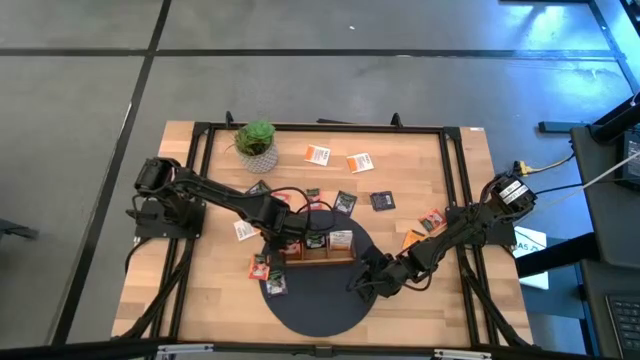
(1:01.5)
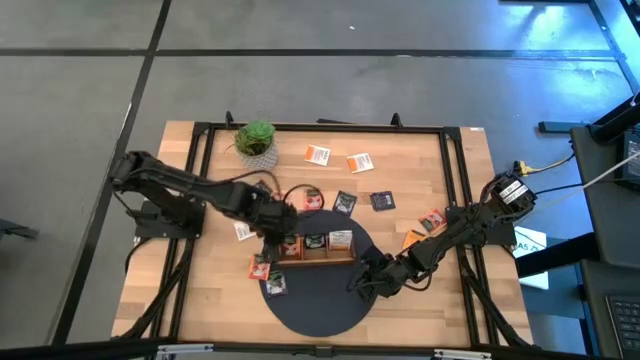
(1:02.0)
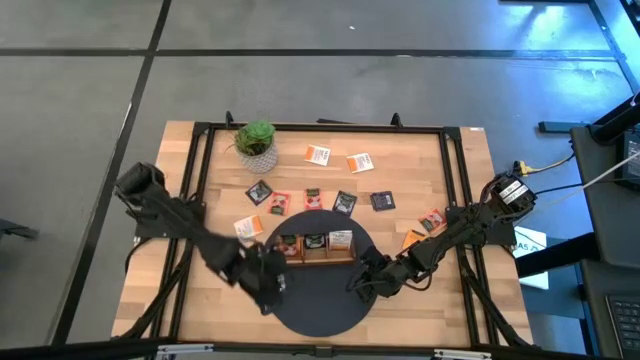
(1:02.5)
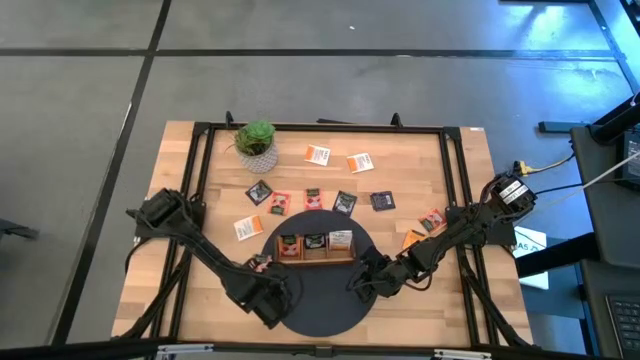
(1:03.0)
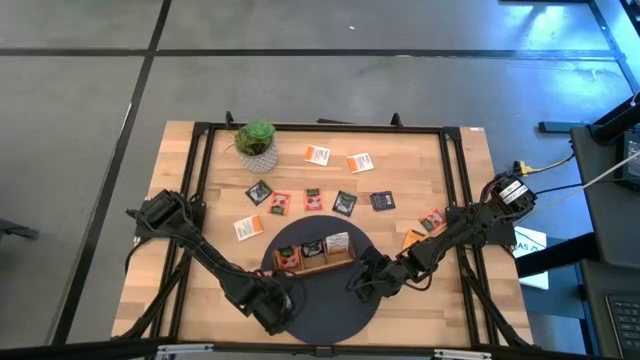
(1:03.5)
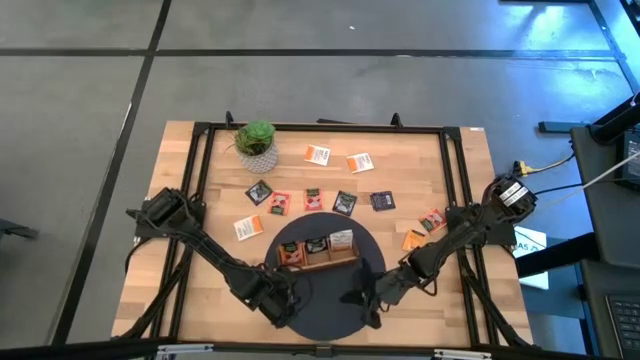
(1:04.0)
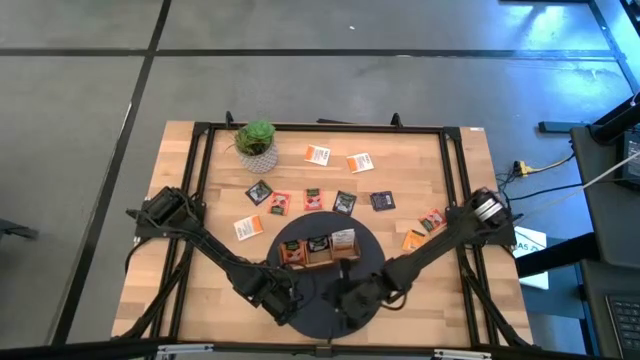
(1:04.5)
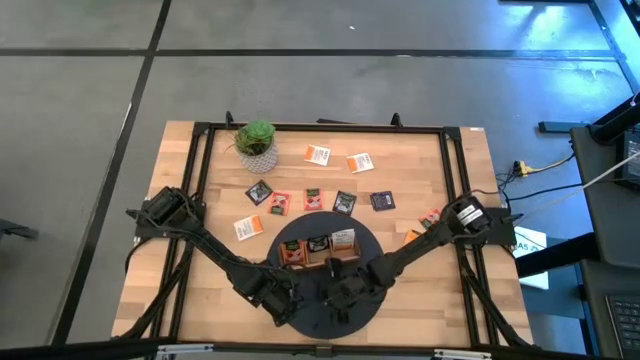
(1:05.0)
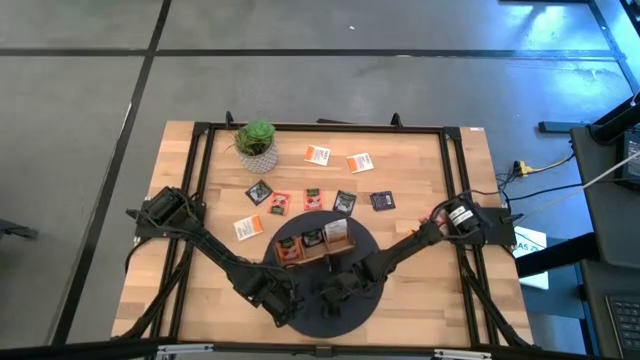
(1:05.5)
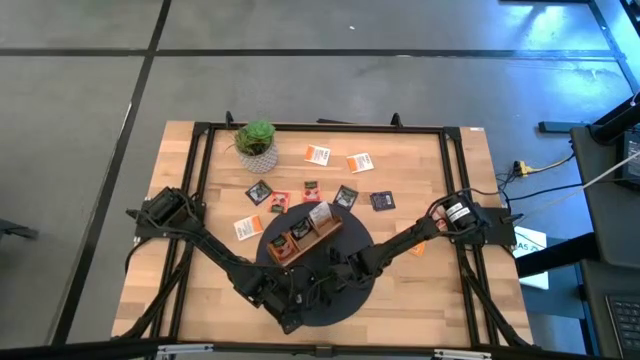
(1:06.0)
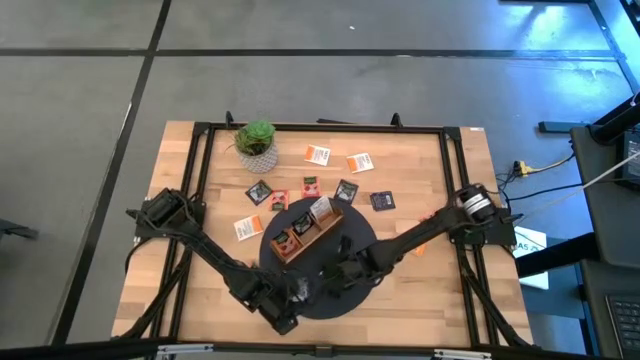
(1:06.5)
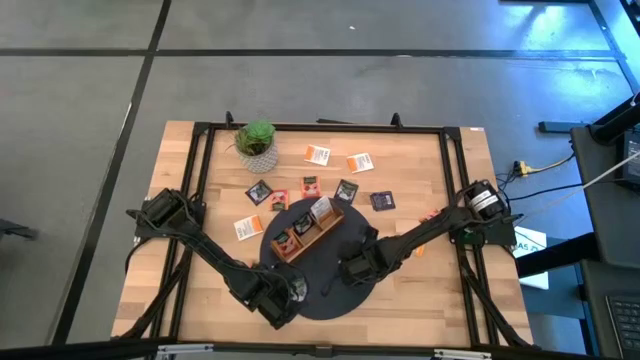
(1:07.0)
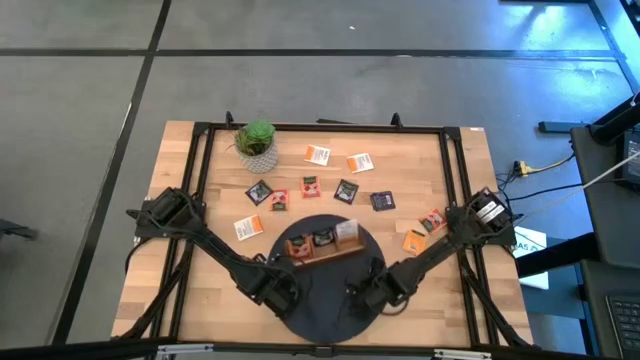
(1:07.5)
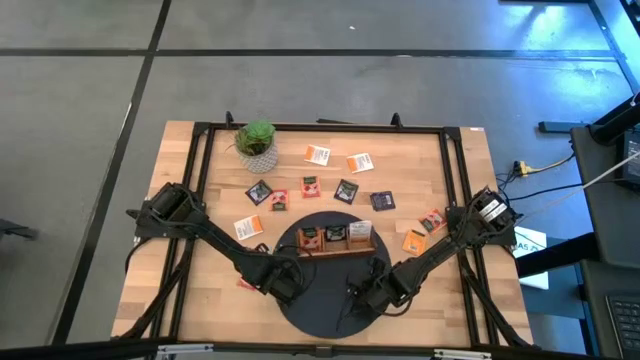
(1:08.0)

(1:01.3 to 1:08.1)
Task: Pick & Place Tea
Adjust the mat on the table

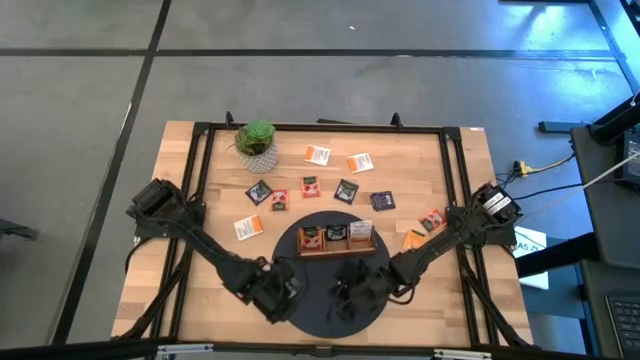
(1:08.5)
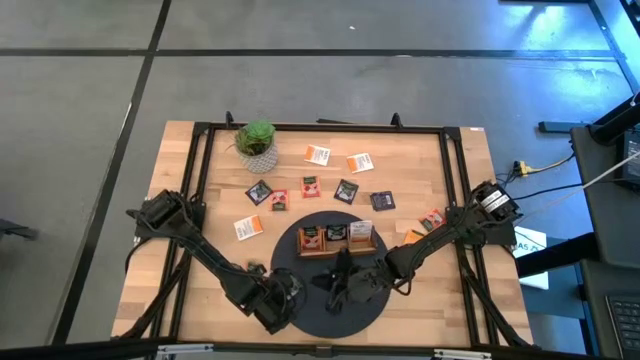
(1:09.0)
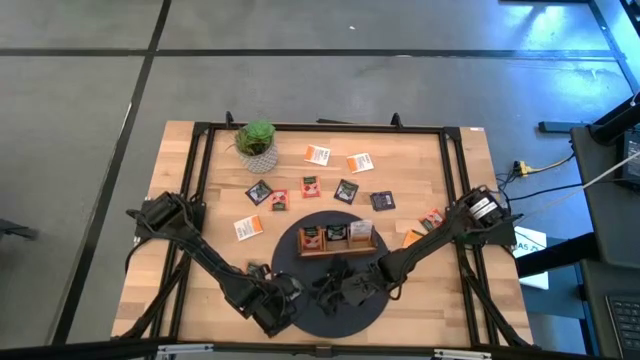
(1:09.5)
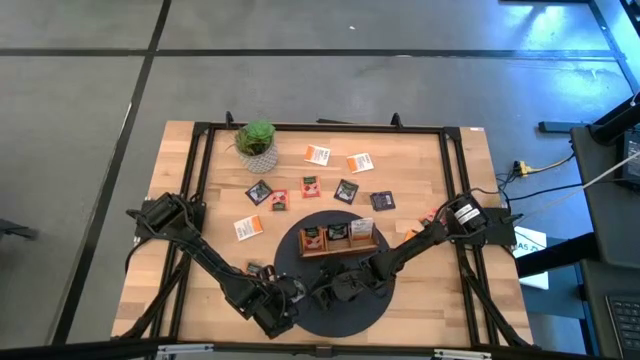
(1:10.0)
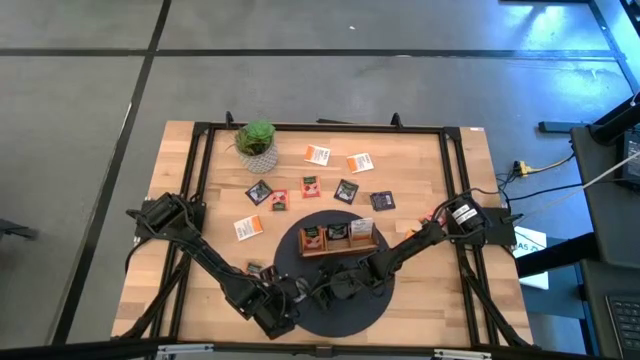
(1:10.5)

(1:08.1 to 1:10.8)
Put the violet tea bag into the middle slot of the wooden organizer

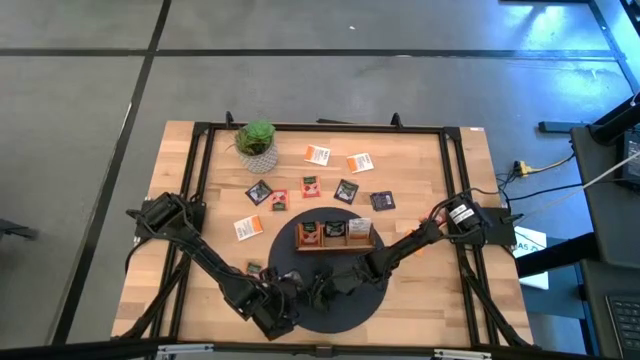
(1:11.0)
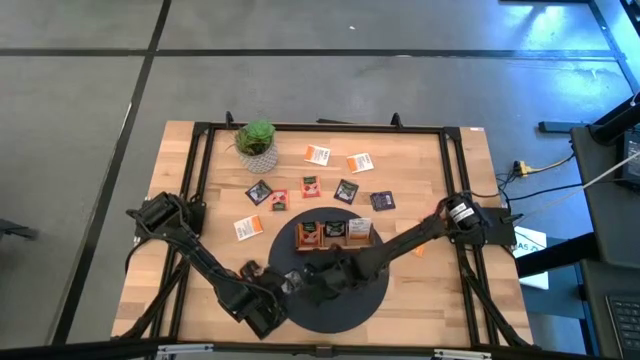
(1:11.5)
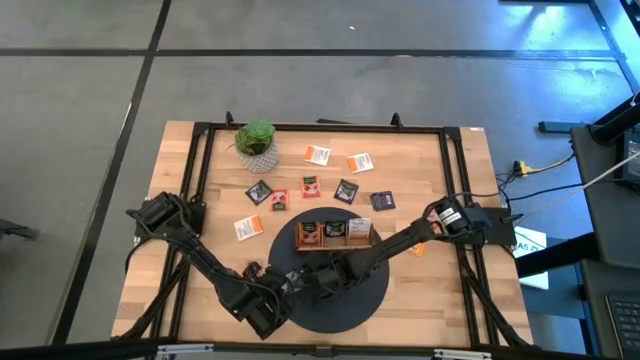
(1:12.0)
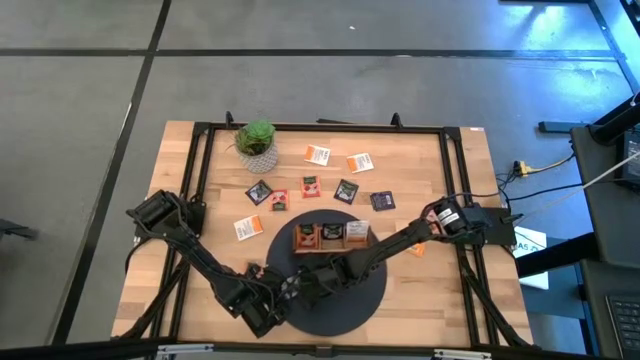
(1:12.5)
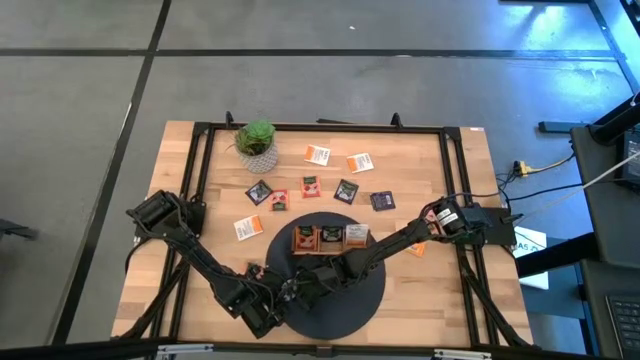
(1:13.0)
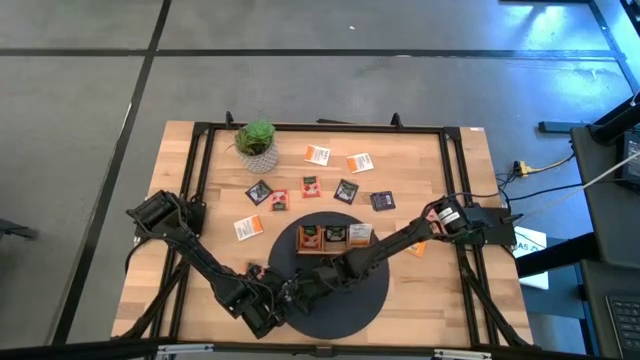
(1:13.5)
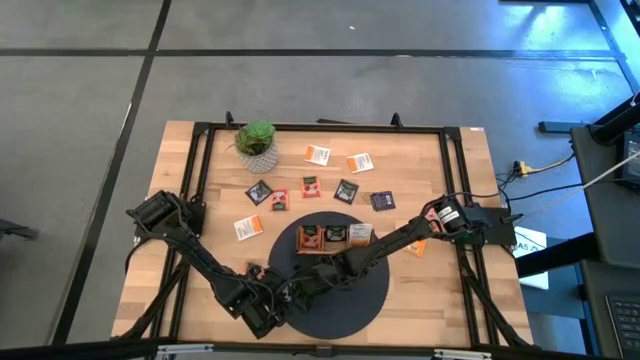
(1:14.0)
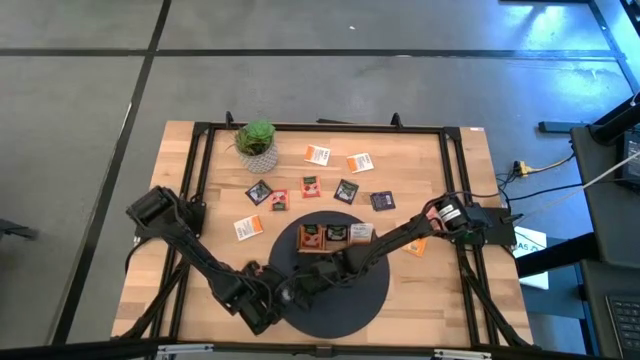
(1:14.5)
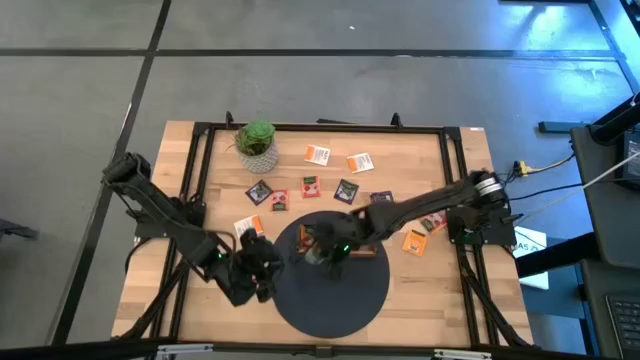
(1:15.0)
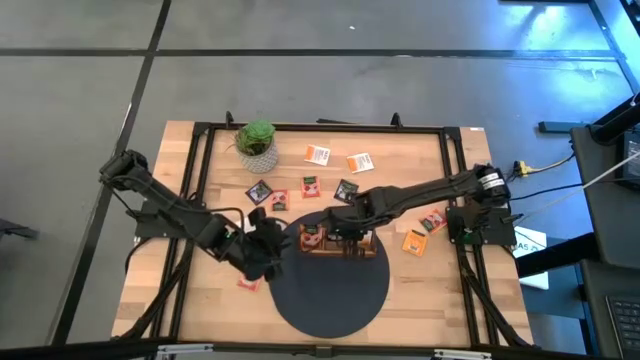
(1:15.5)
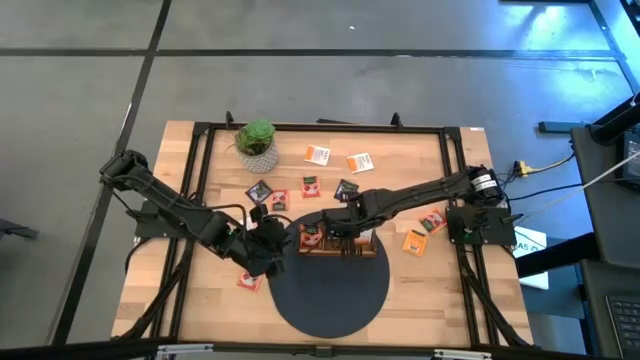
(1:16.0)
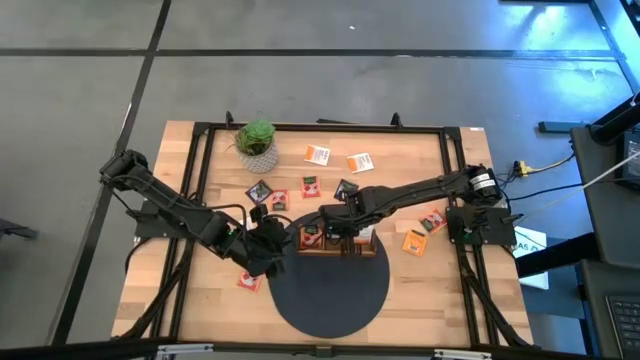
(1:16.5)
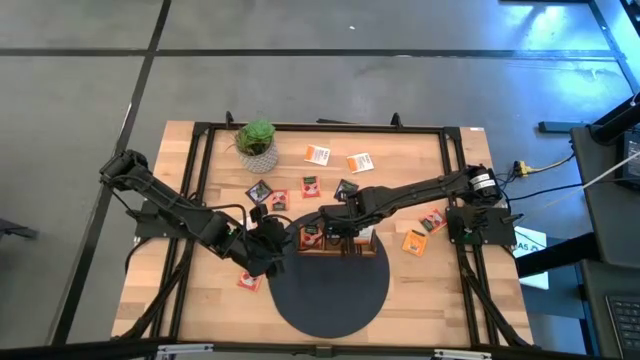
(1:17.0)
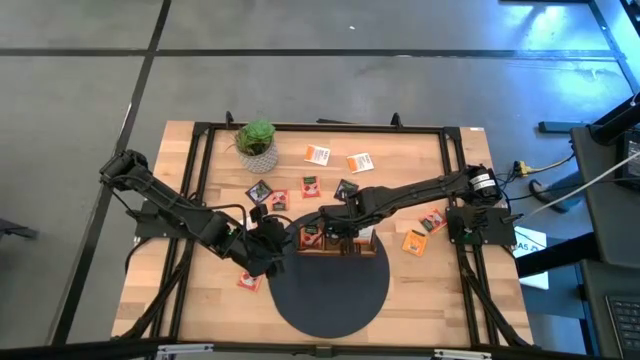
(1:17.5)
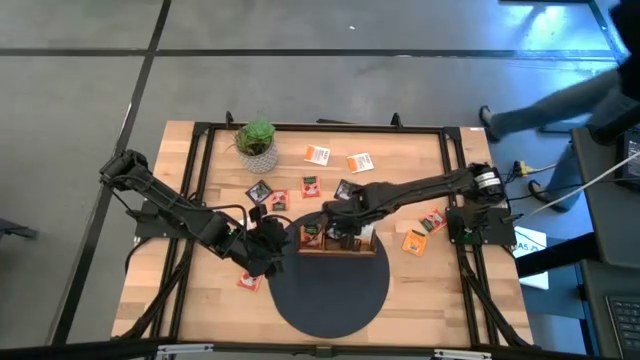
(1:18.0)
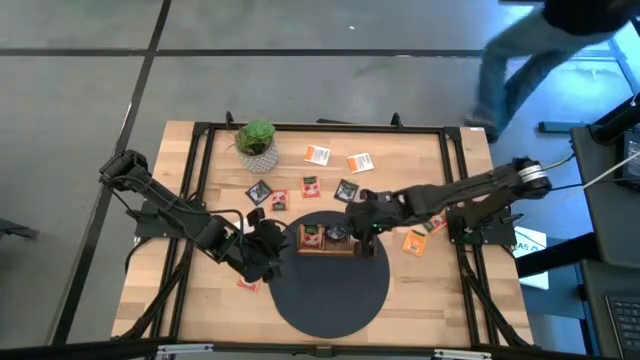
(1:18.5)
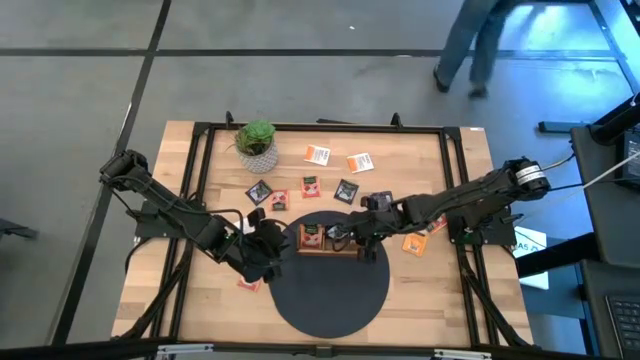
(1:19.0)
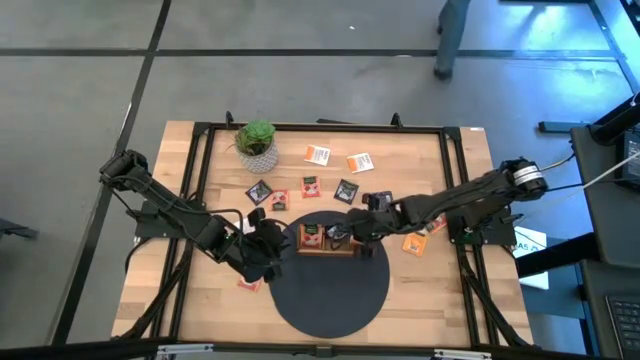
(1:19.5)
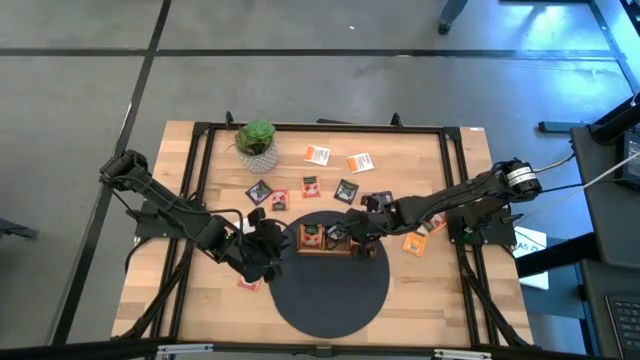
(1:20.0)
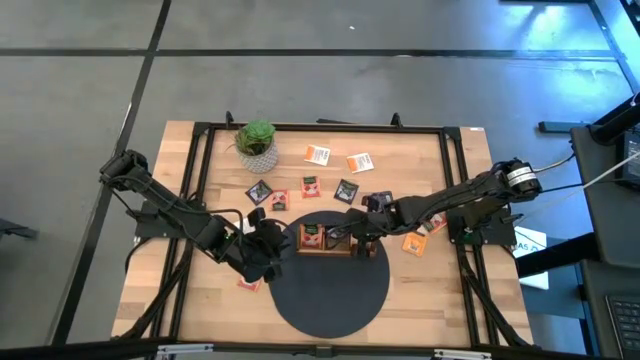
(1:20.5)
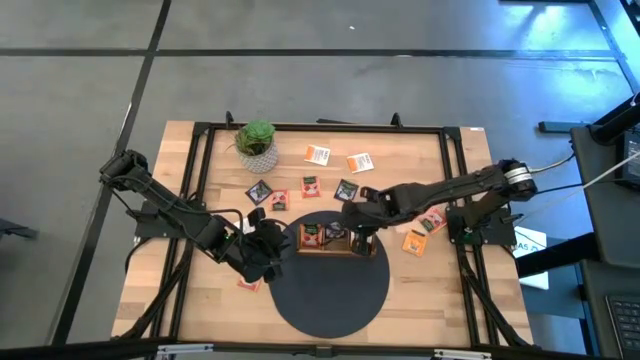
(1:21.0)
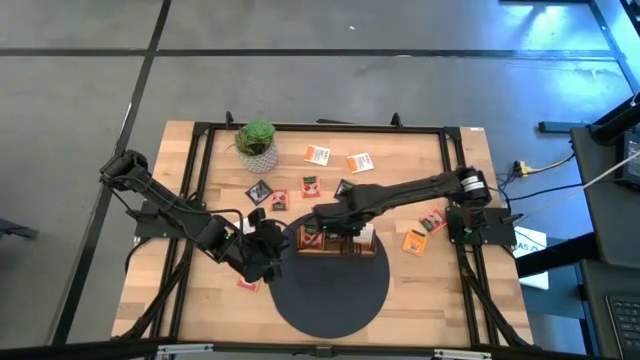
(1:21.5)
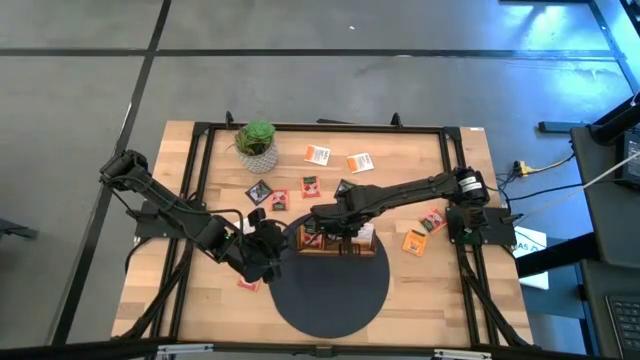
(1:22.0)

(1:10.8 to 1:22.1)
Put the violet tea bag into the middle slot of the wooden organizer
